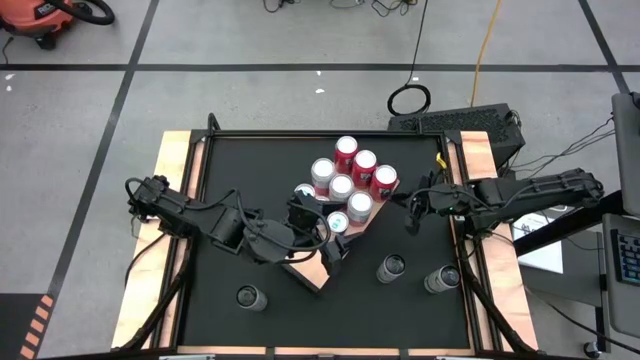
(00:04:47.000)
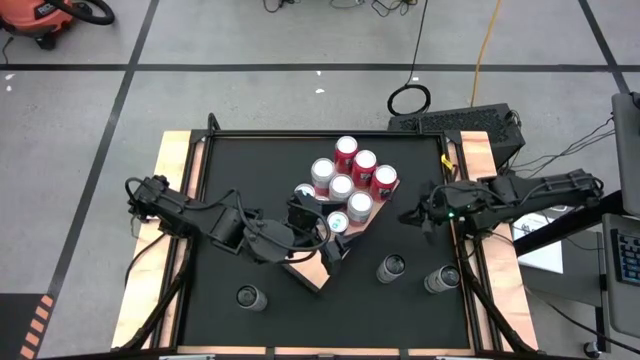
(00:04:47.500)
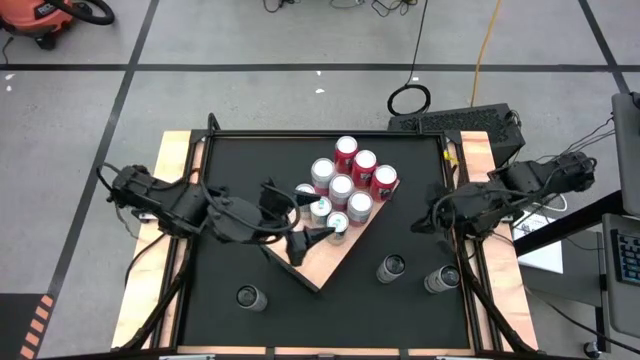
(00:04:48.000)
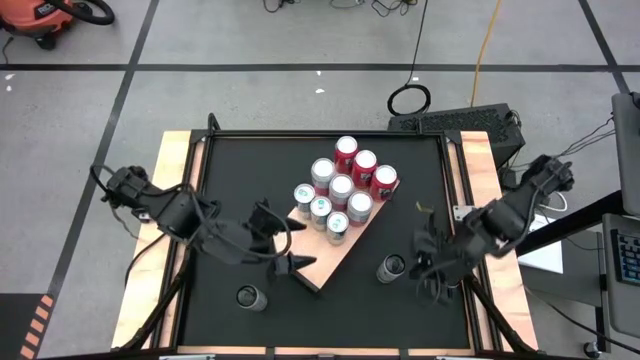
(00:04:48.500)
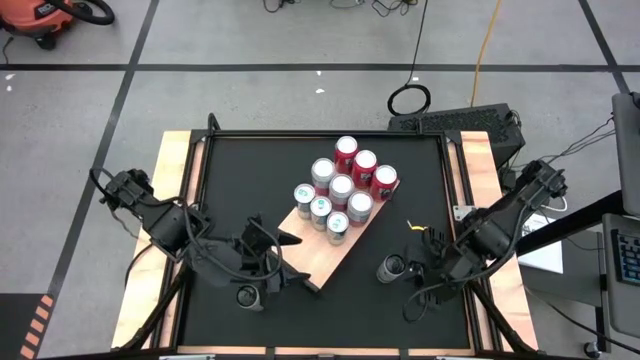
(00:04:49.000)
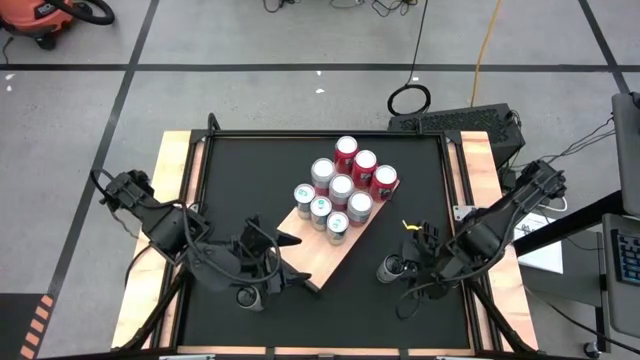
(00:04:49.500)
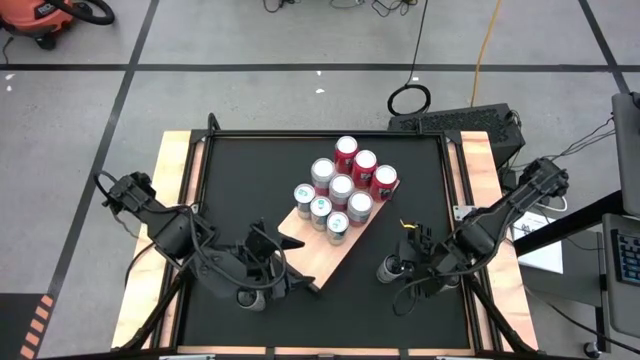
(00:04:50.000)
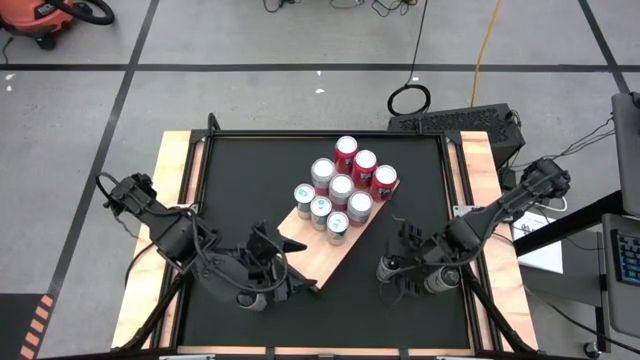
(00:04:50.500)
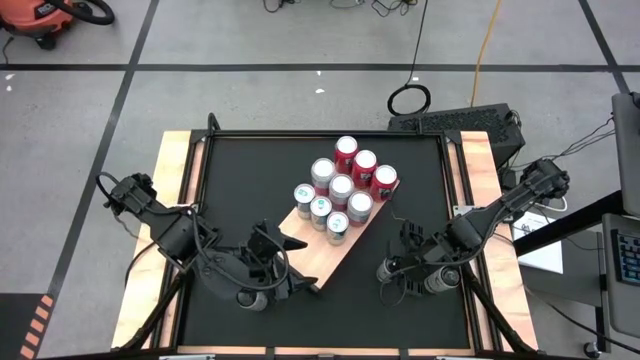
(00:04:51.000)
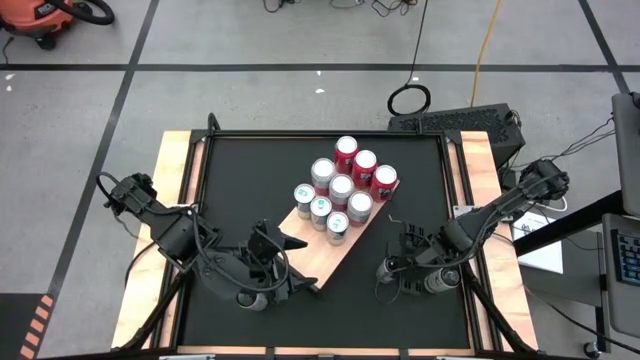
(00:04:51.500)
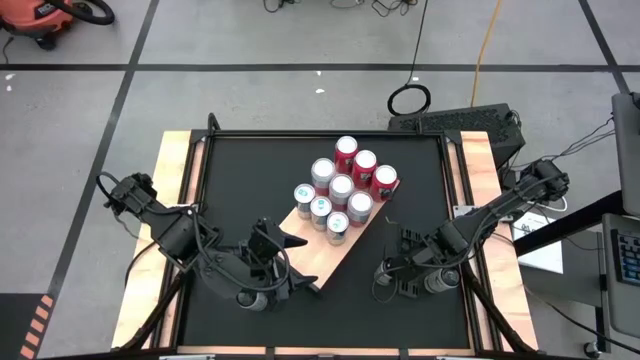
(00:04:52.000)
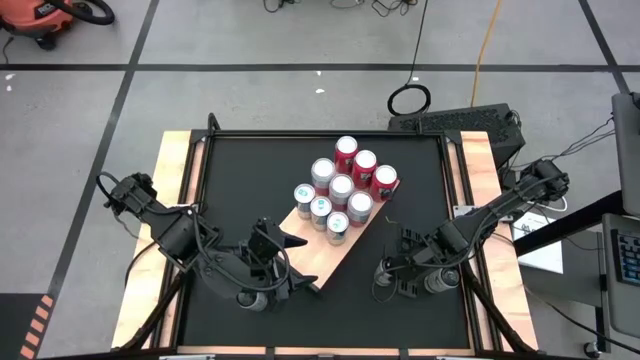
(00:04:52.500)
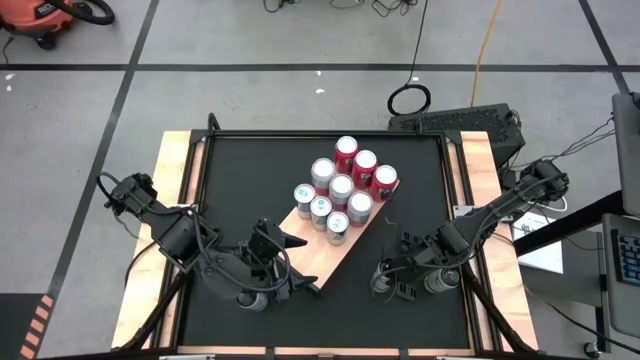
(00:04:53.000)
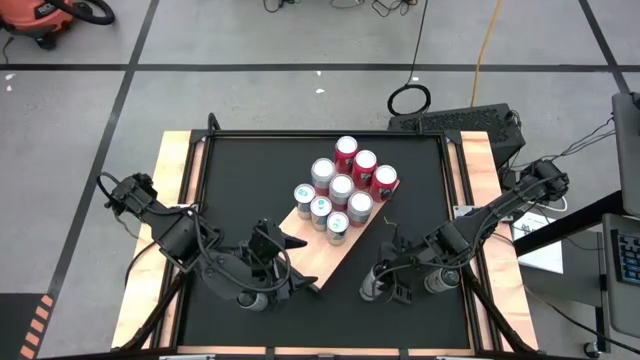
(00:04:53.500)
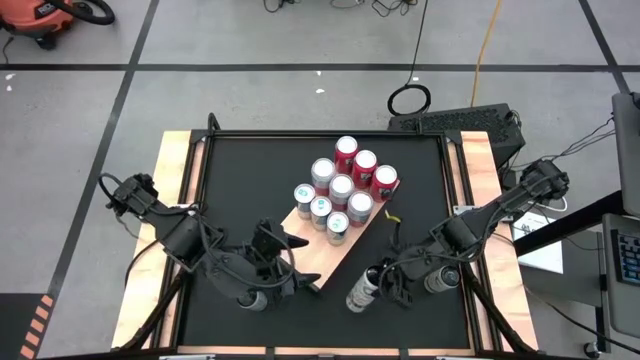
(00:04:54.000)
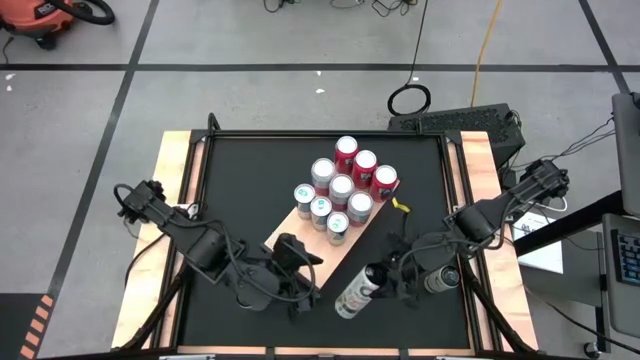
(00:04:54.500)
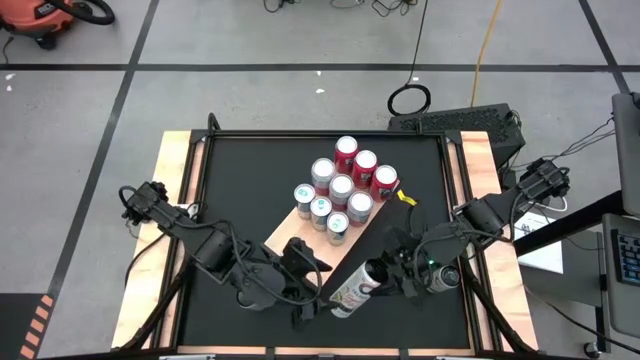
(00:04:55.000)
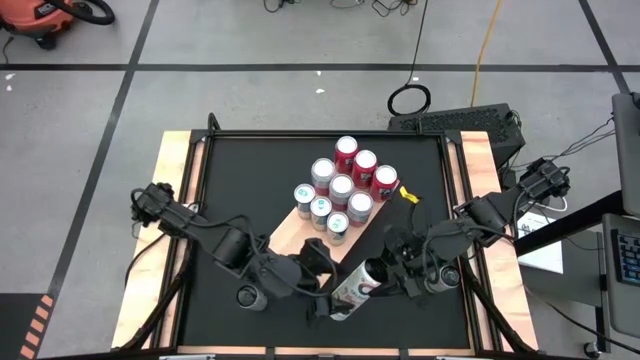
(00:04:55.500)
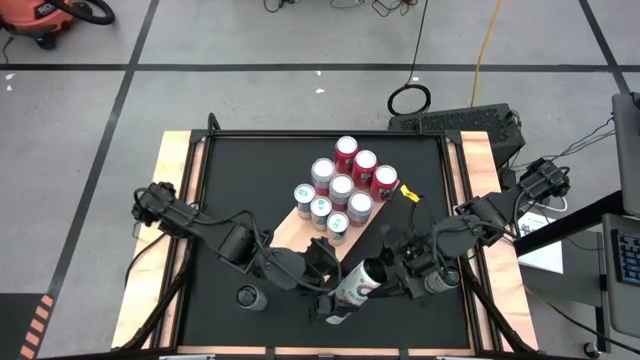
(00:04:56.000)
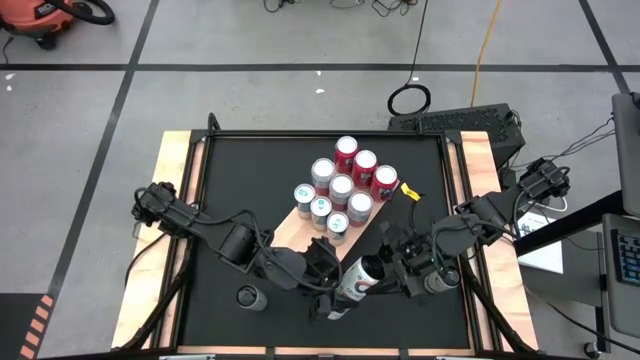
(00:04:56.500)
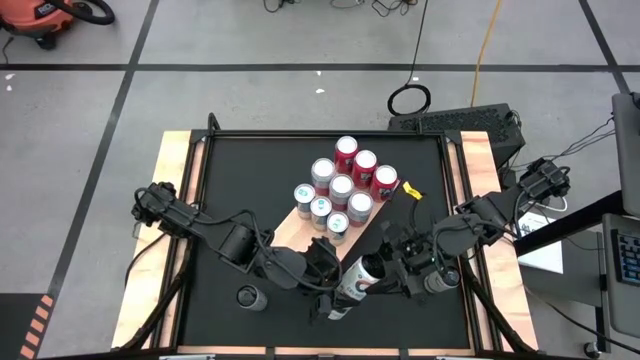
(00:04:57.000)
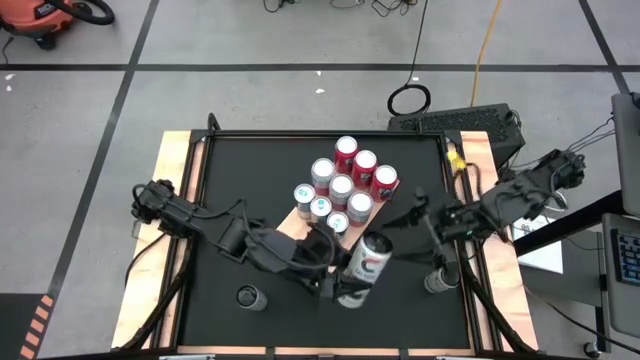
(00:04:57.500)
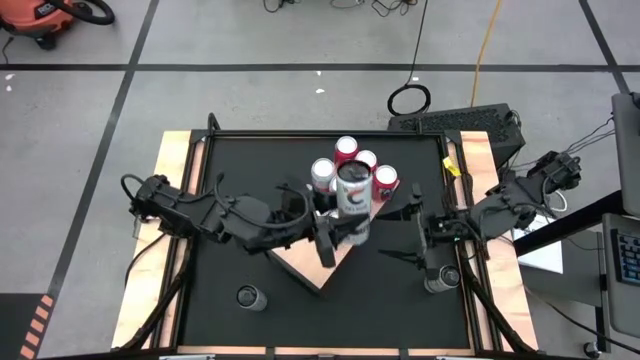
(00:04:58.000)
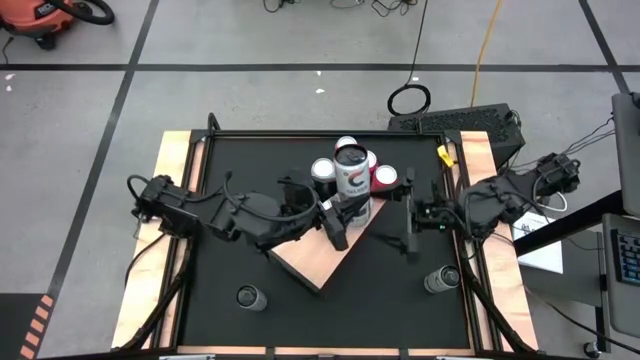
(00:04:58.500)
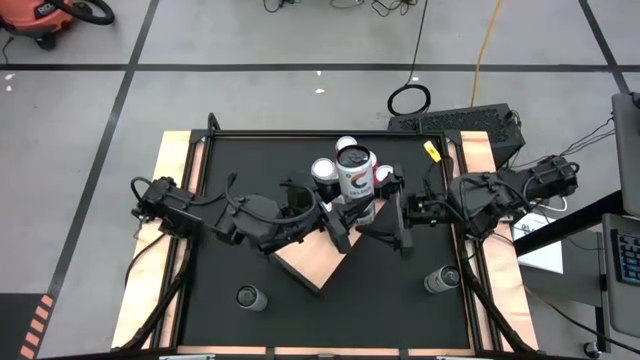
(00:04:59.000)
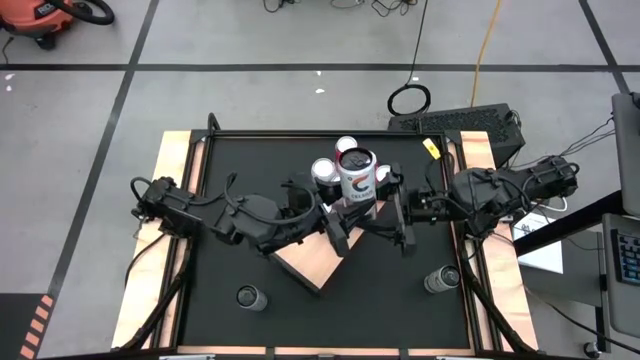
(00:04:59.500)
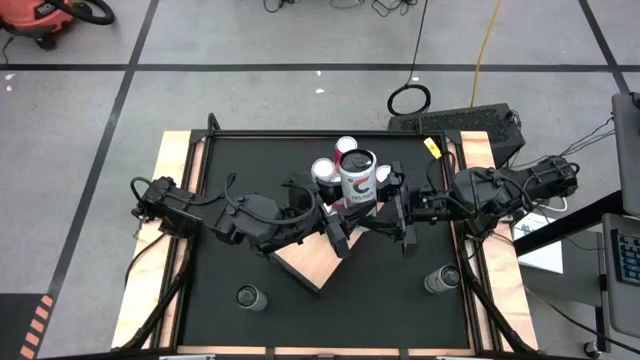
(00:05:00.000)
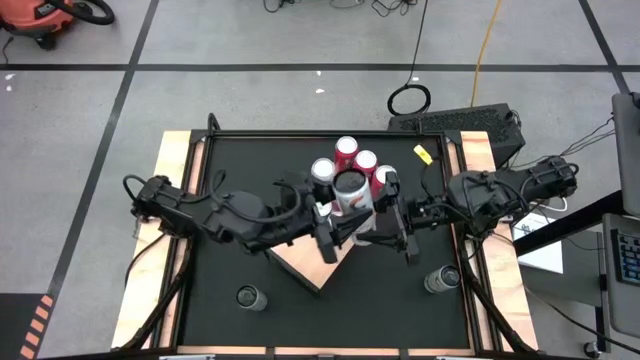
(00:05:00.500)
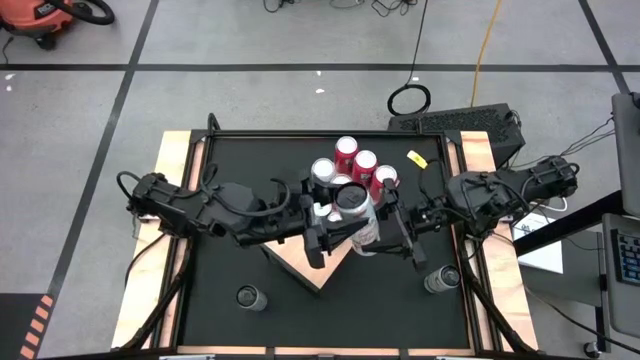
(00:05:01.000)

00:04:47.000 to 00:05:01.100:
Task: Place canned beverage on shelf
Put the top left white-yellow soda can on the shelf

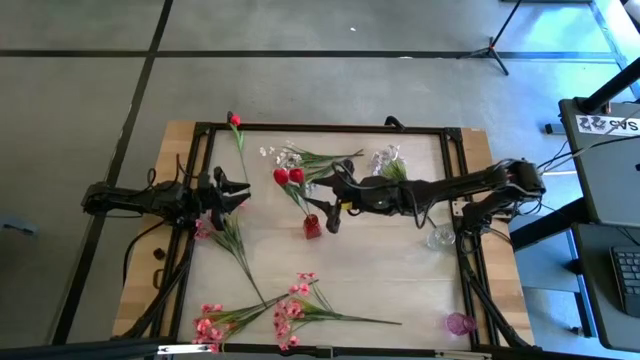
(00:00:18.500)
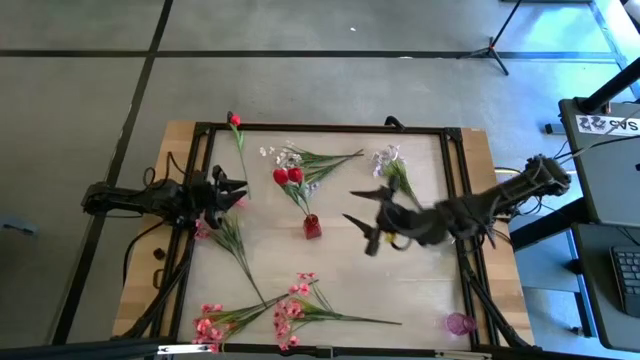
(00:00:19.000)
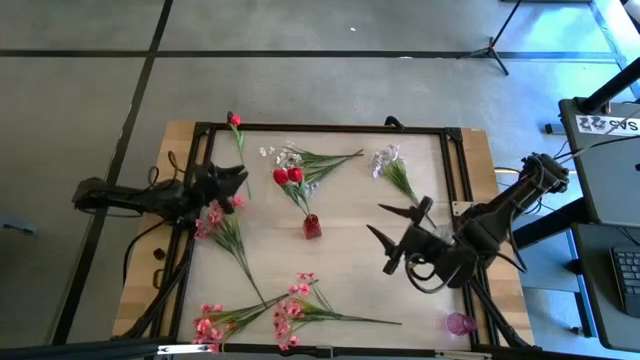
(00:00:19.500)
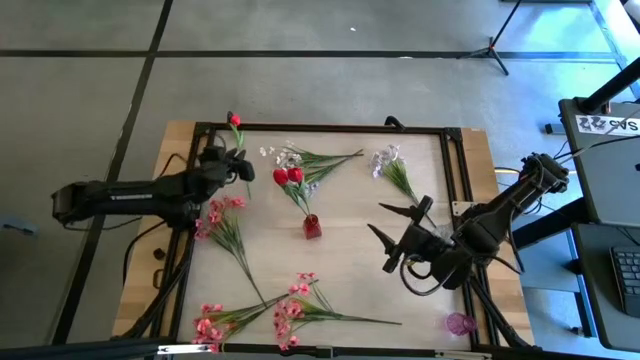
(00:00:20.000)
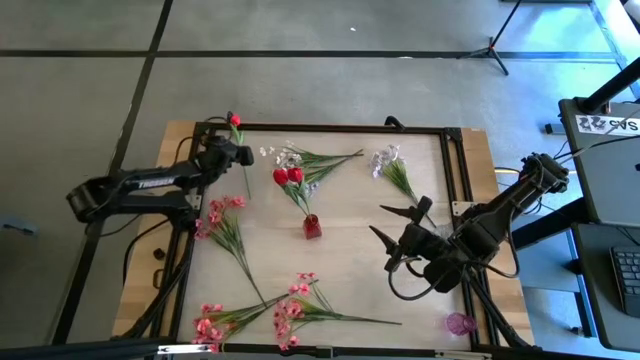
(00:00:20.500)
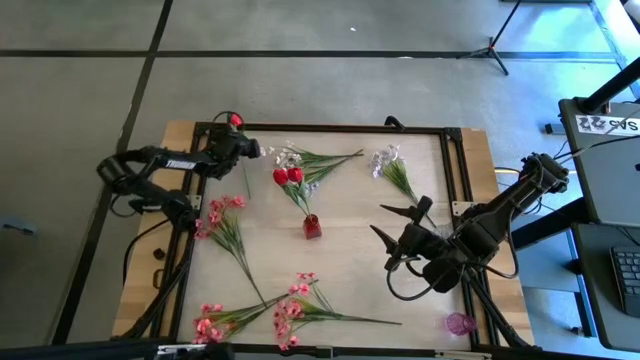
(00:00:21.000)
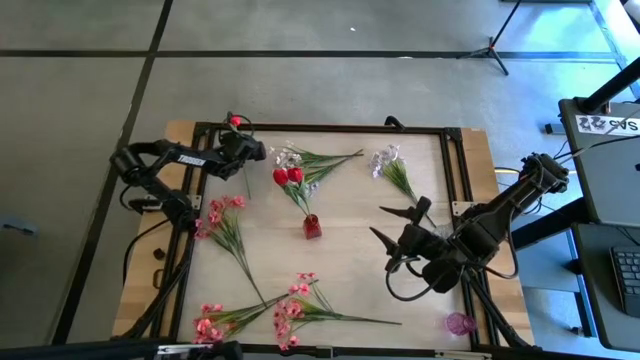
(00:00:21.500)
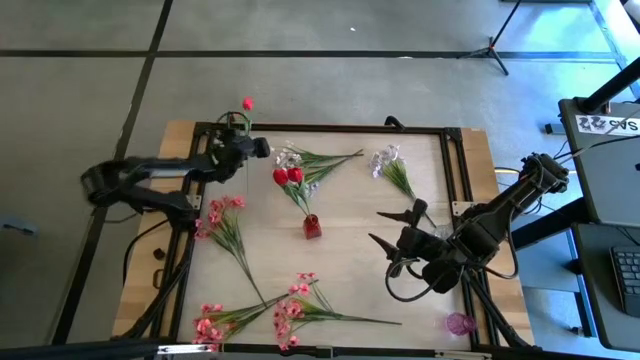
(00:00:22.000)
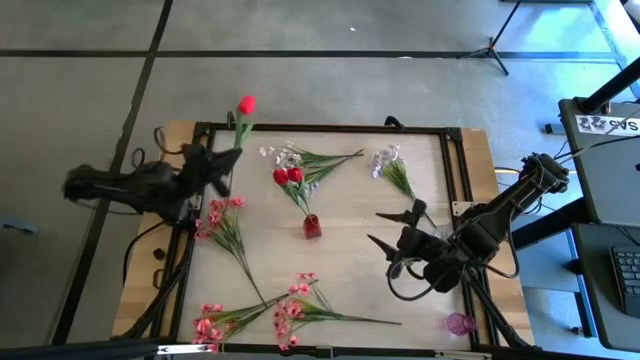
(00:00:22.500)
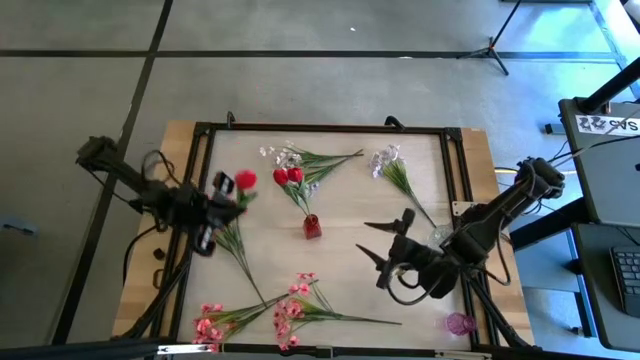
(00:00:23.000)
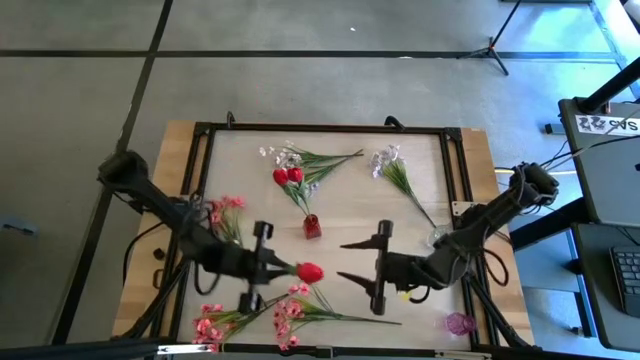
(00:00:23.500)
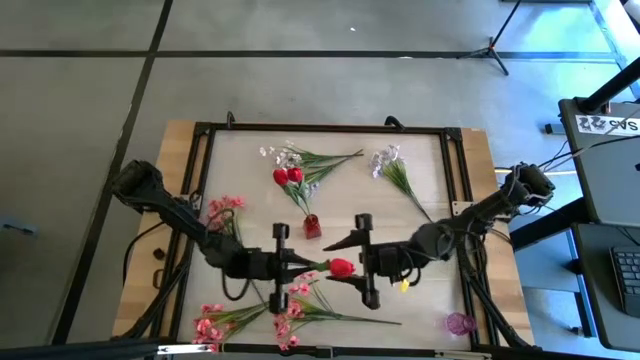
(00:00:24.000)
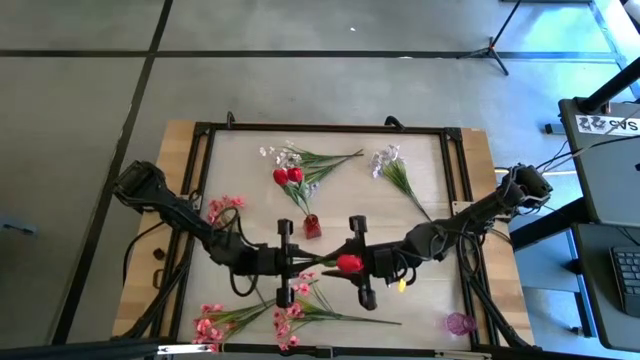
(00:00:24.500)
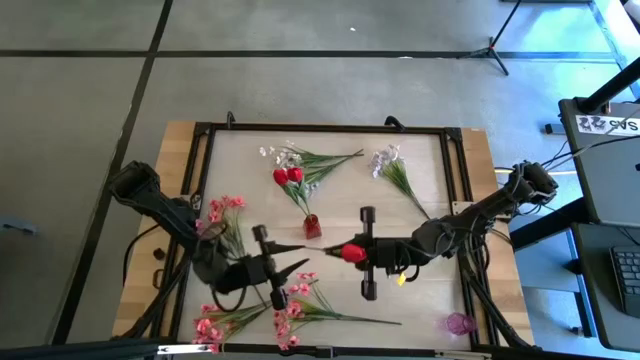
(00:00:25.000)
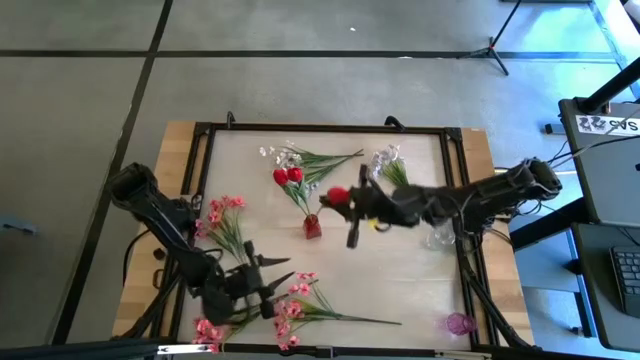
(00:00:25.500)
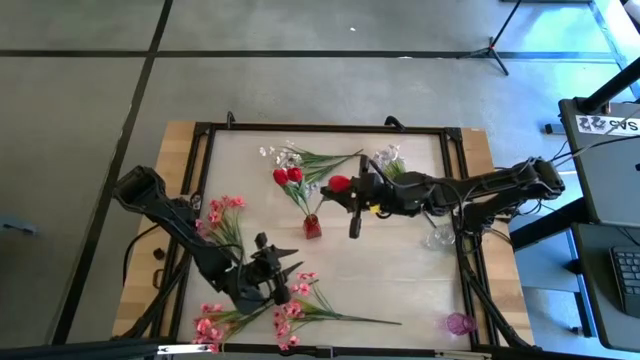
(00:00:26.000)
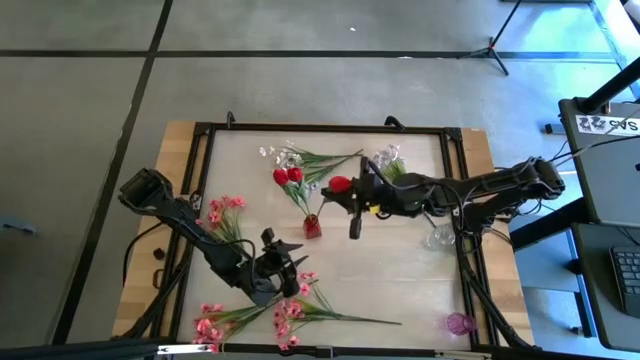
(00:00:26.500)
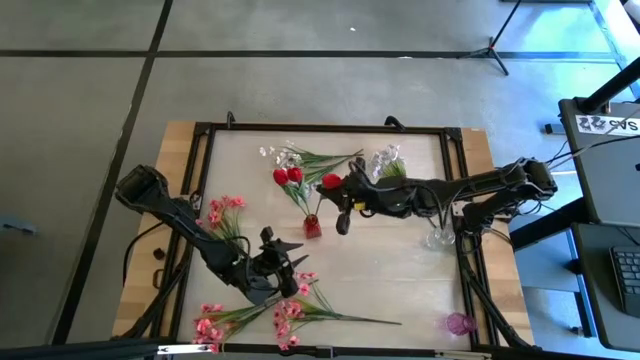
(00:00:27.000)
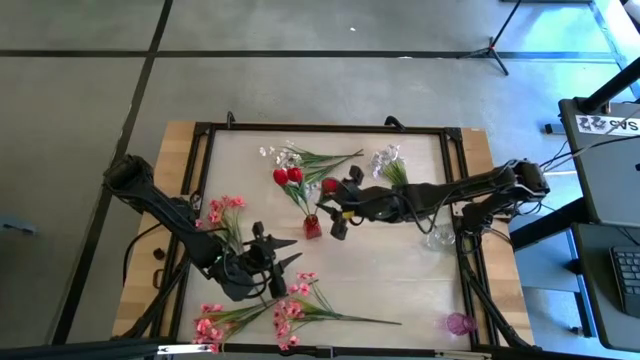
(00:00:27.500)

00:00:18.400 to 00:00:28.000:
Task: Sort flowers into vase by color
Put the red tulip into the red vase
